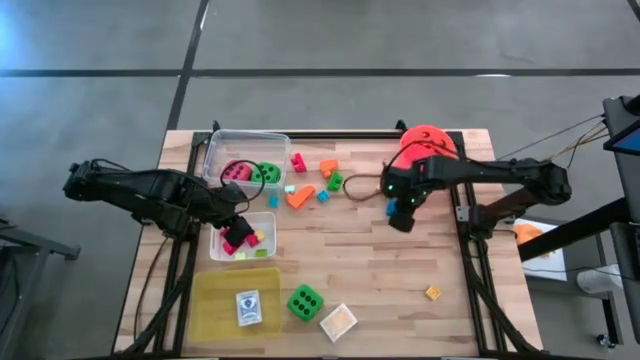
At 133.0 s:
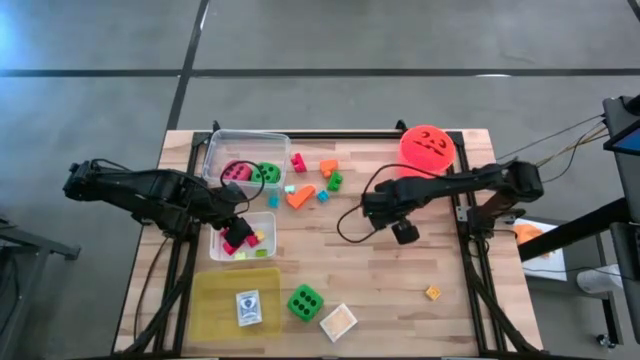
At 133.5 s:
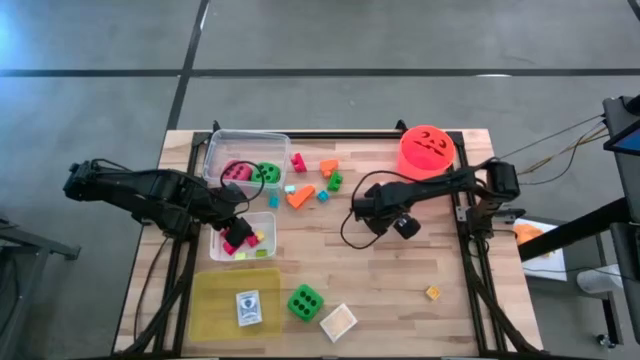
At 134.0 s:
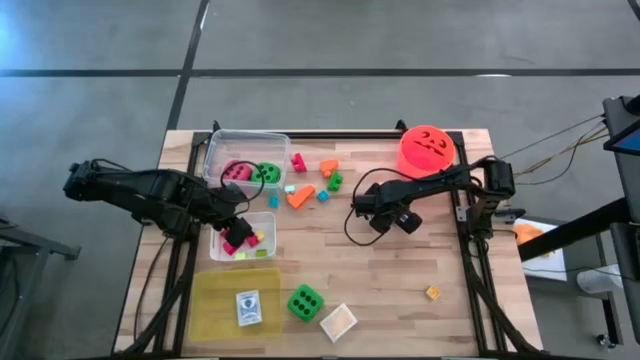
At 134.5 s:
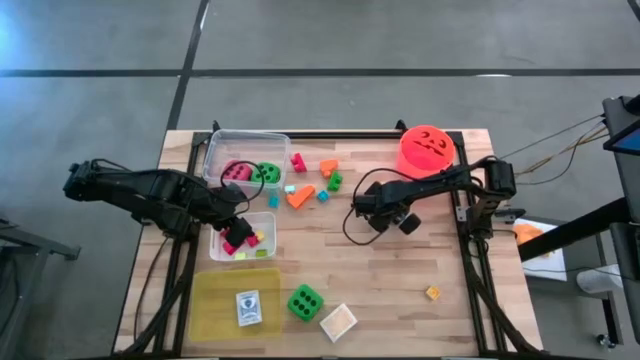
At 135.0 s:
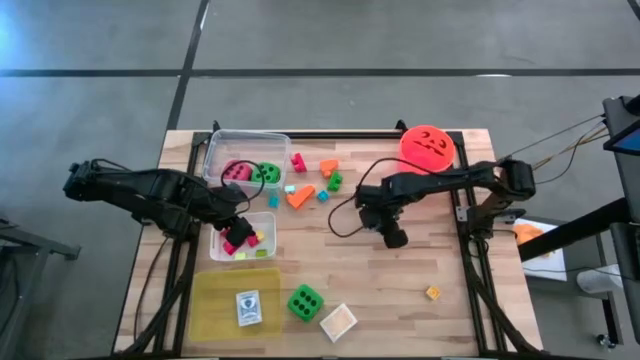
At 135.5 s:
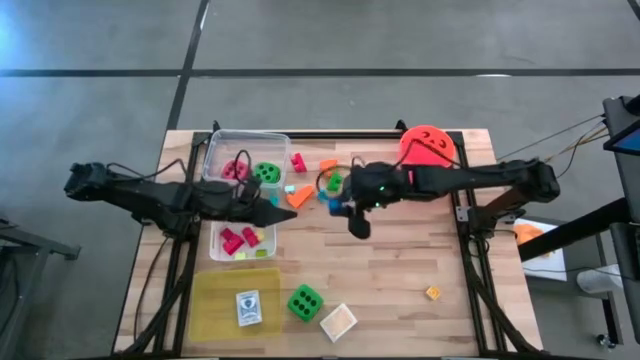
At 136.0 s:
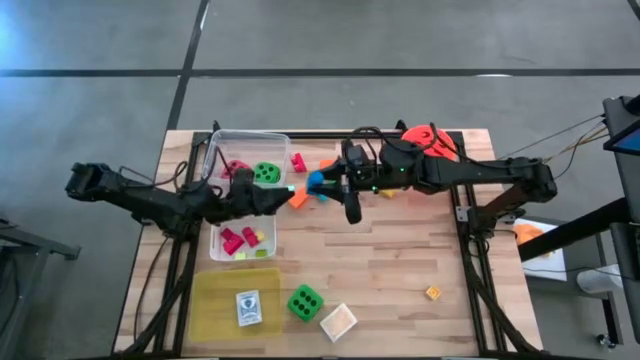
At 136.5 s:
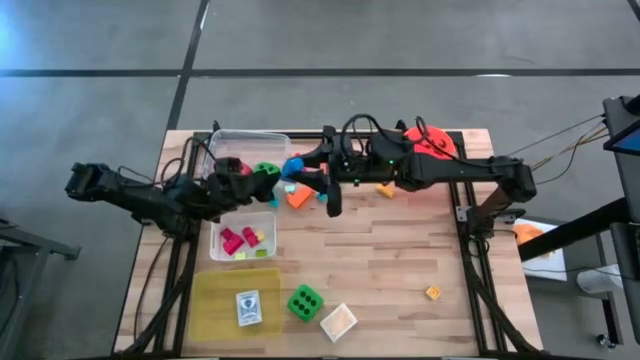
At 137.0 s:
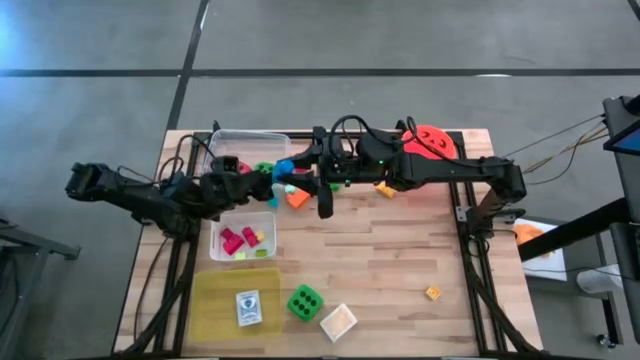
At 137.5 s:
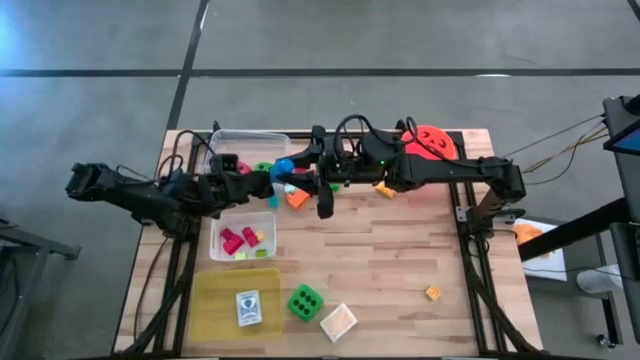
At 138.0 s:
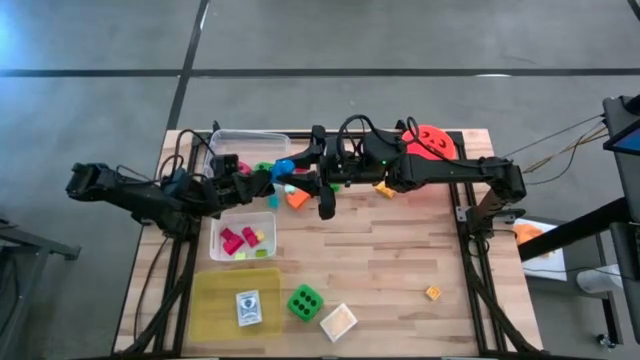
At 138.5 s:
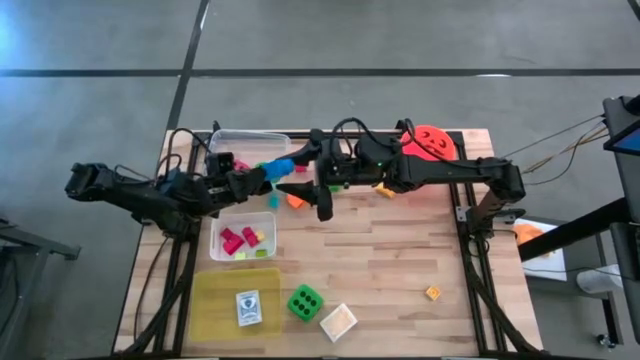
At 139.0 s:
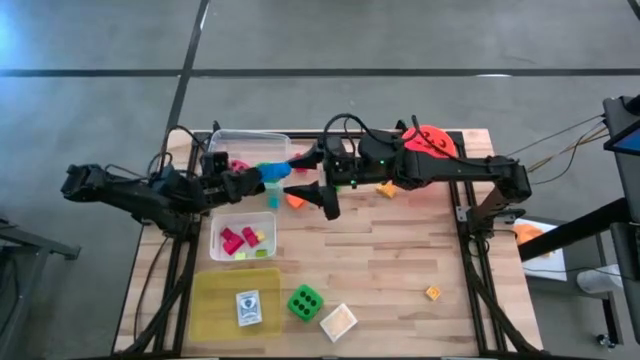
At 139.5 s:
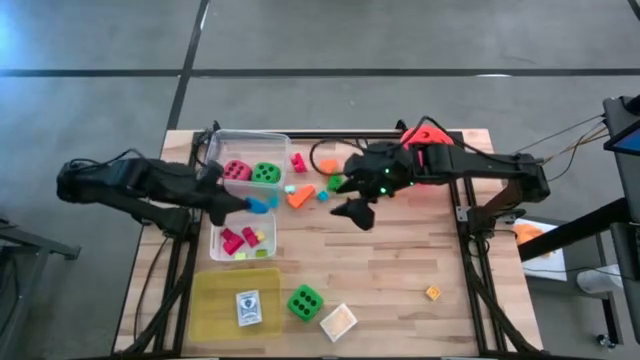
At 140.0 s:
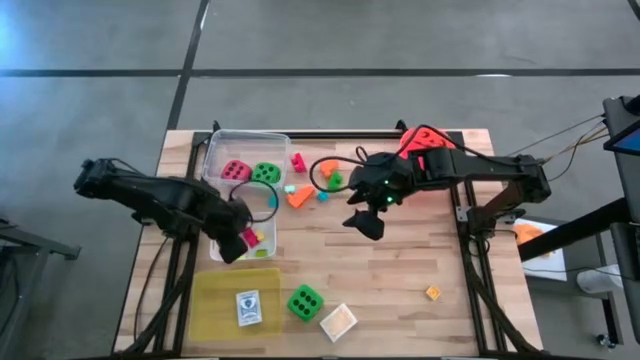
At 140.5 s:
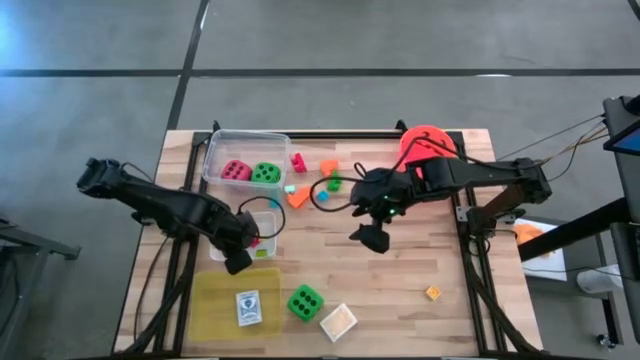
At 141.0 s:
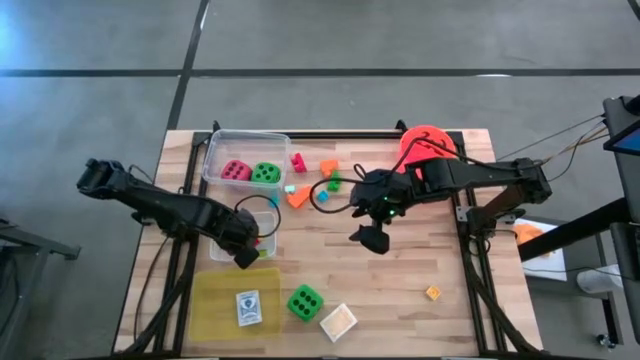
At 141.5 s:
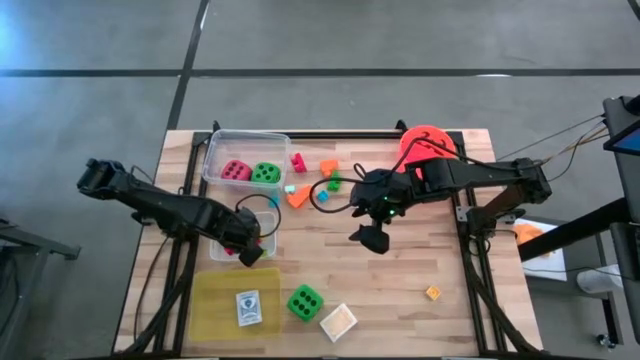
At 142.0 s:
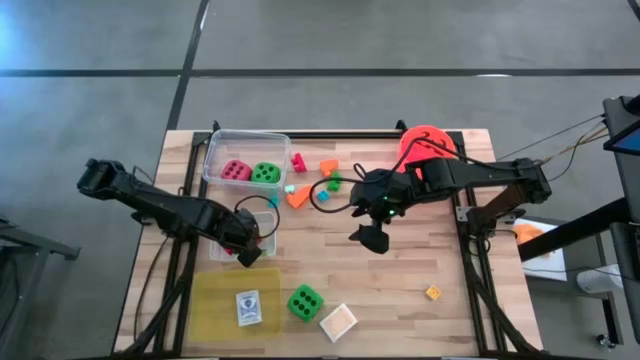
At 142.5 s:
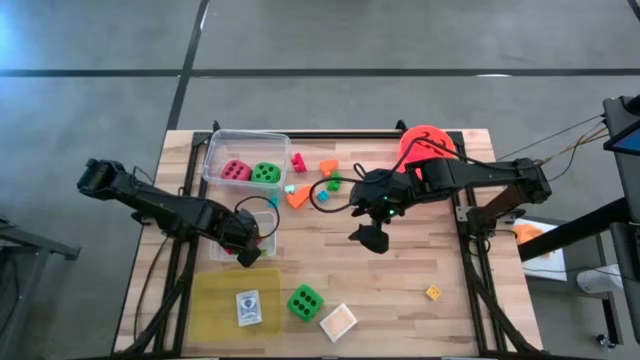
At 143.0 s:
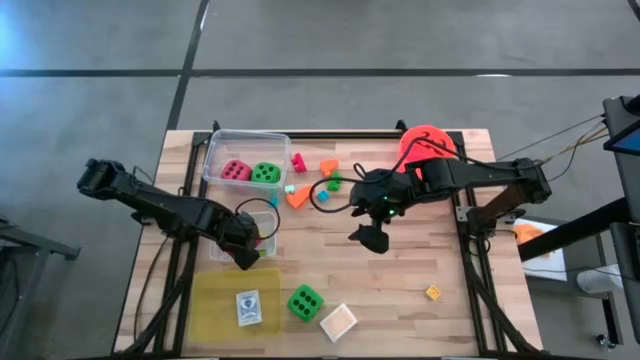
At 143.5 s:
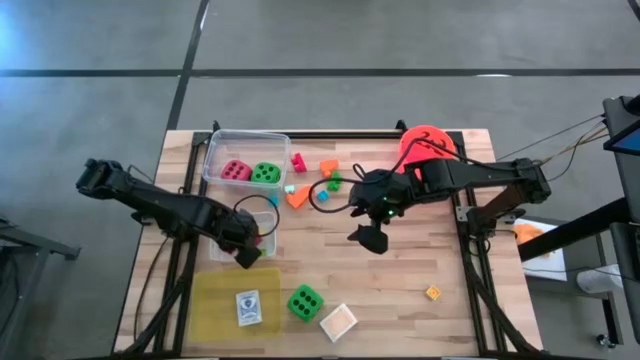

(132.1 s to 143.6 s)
Task: Pick & Place Toys
Put the dark blue game piece into the white bin

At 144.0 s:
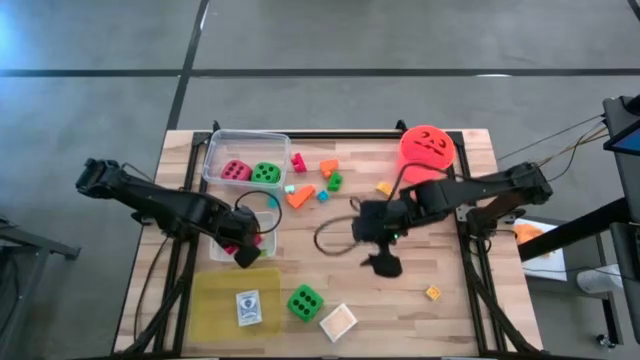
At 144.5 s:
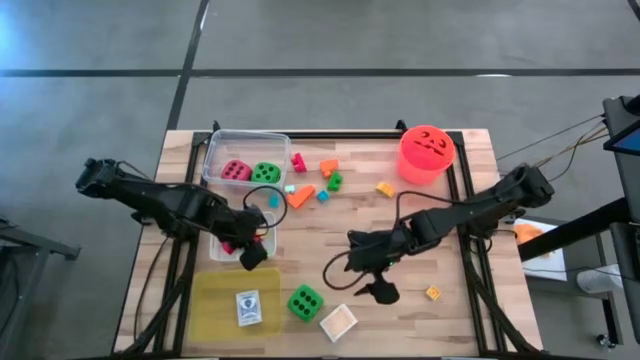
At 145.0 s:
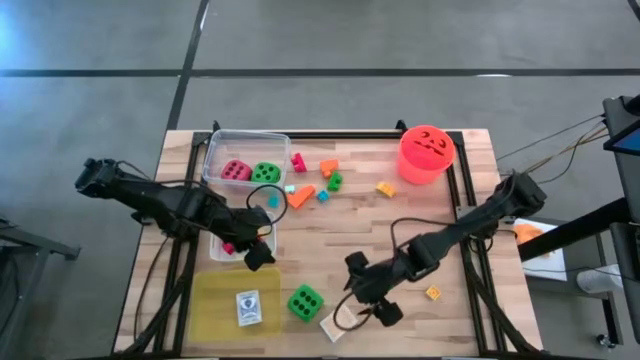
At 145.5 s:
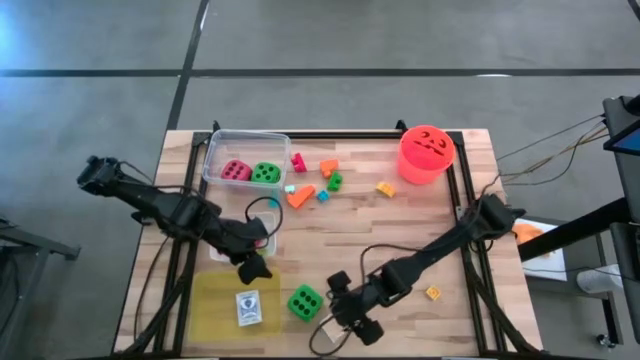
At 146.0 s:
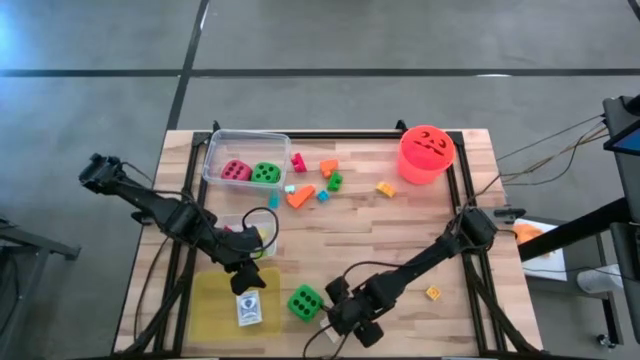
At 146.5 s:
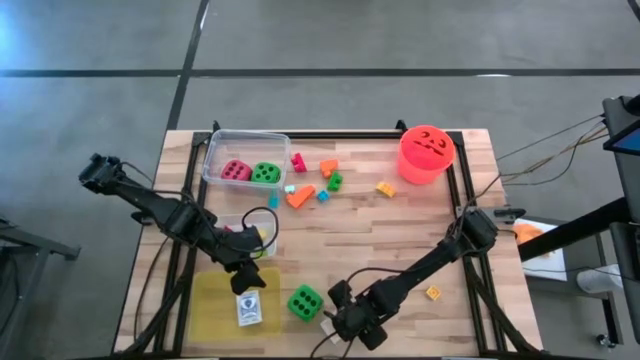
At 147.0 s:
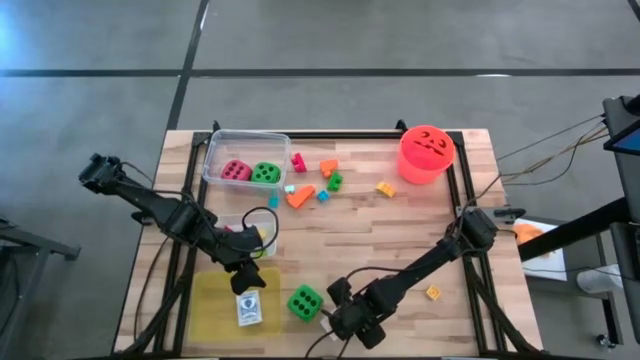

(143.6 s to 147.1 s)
Put the orange deck of cards into the yellow bin

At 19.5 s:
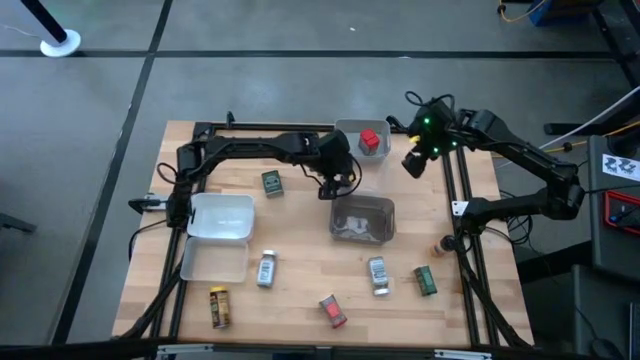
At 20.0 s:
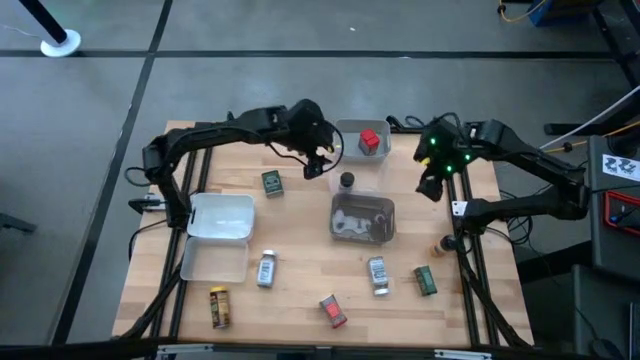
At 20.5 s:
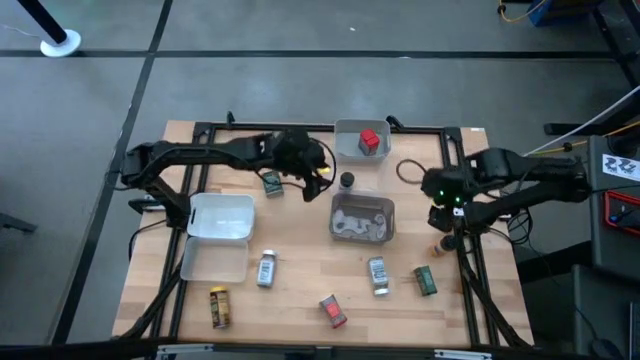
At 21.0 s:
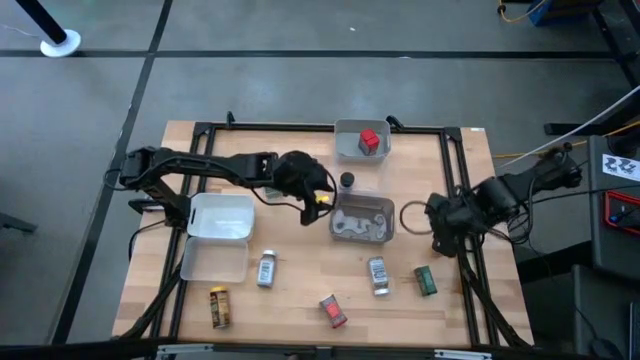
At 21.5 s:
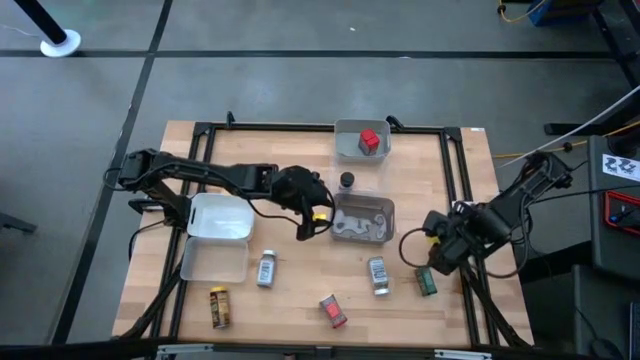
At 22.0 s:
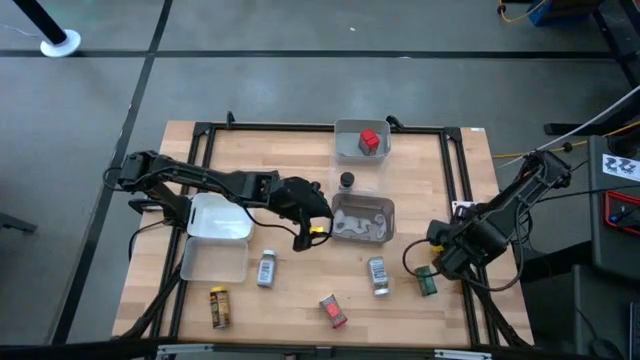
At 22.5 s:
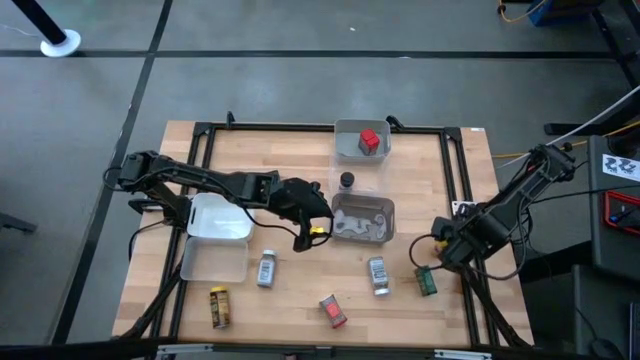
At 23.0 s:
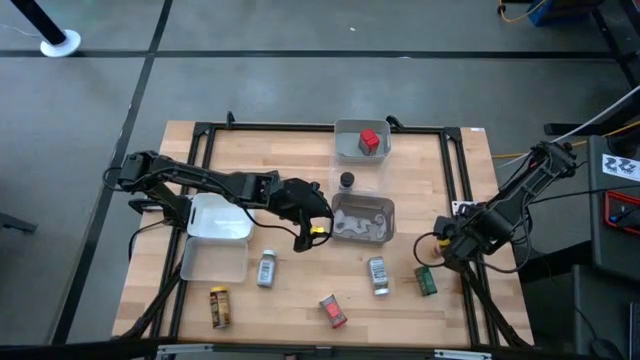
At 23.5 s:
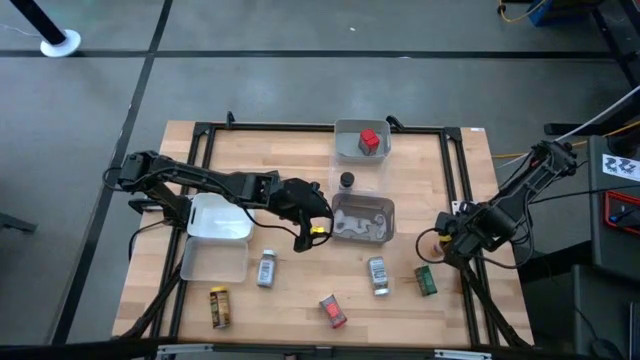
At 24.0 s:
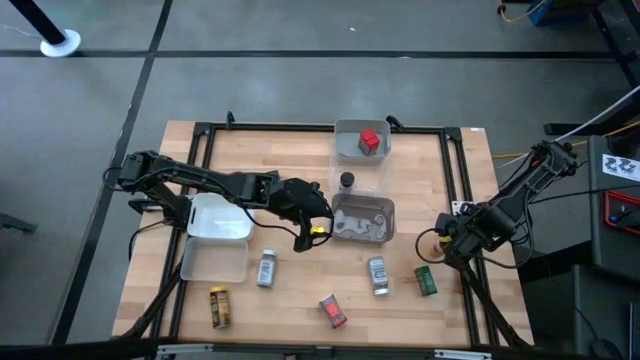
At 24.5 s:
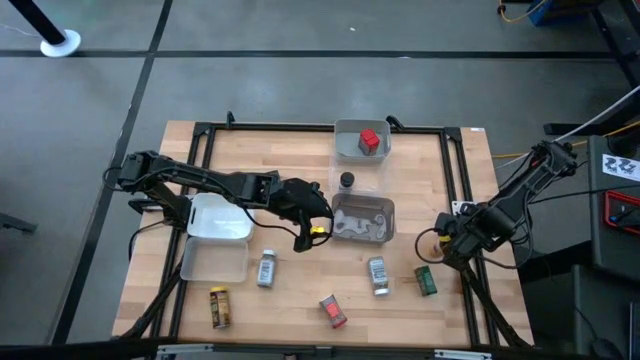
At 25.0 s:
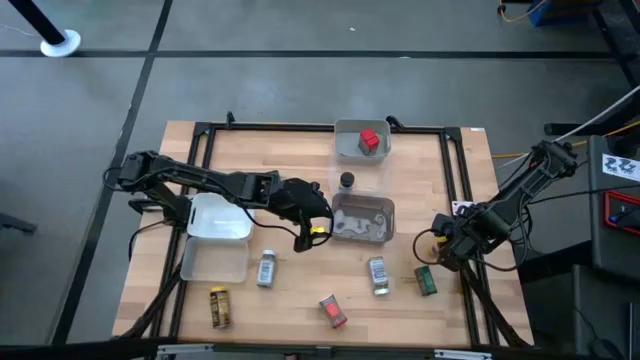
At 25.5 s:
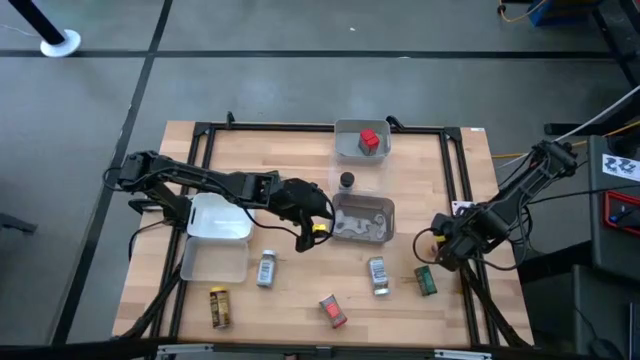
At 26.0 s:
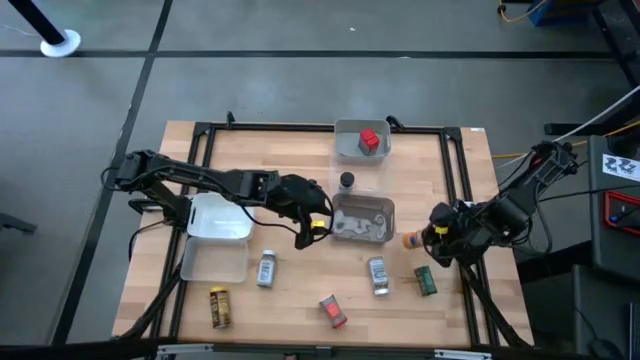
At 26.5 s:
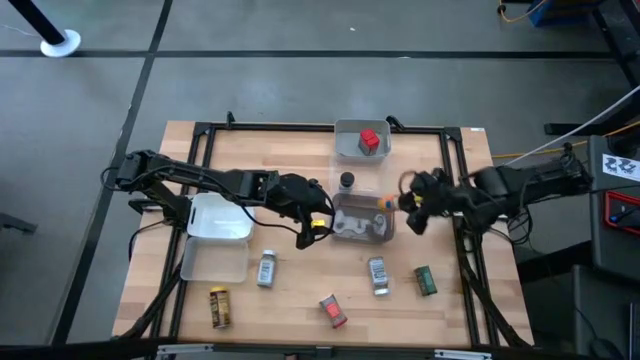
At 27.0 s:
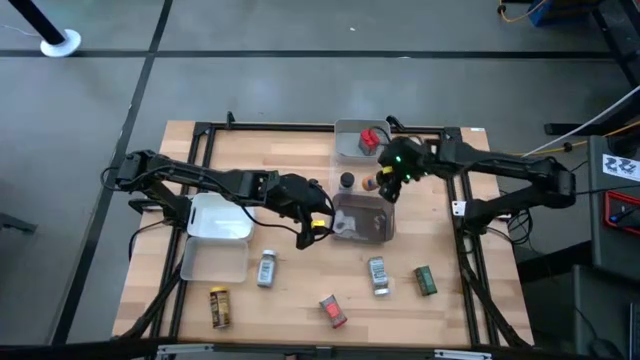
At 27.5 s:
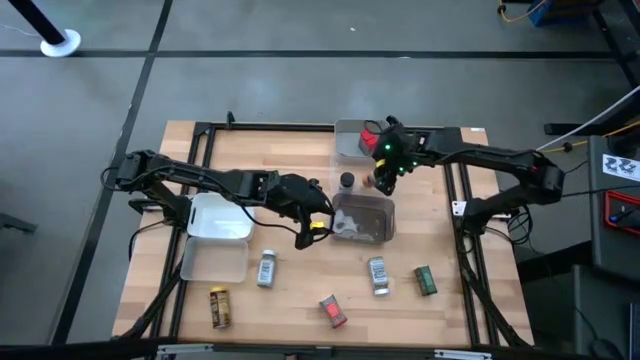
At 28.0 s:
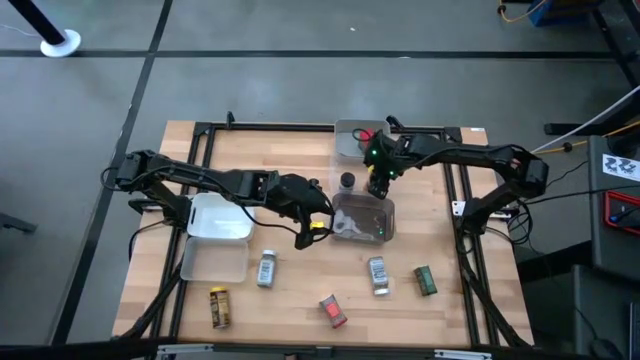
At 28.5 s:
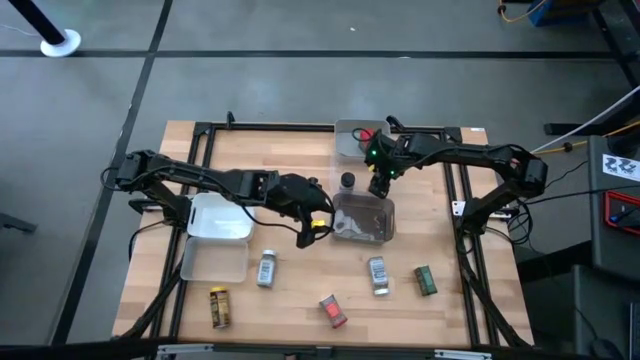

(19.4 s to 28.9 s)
Task: Sort spices by type
Put the orange seasoning bottle into the top transparent bin
